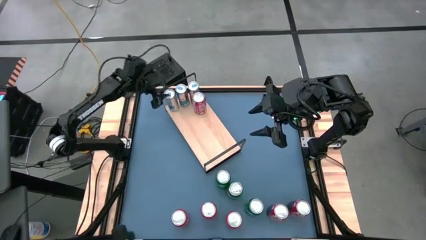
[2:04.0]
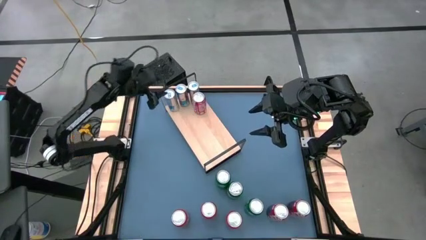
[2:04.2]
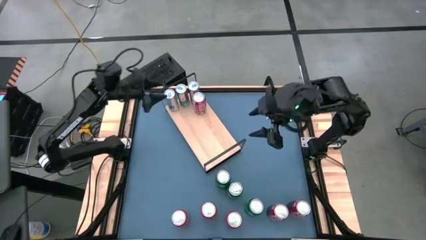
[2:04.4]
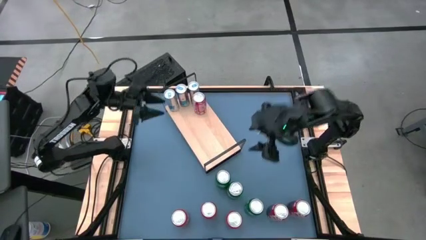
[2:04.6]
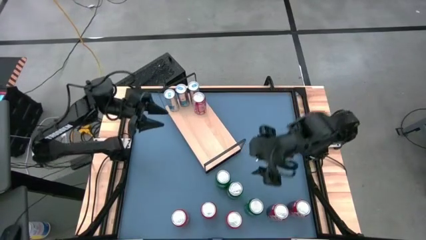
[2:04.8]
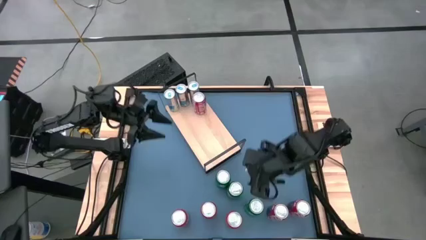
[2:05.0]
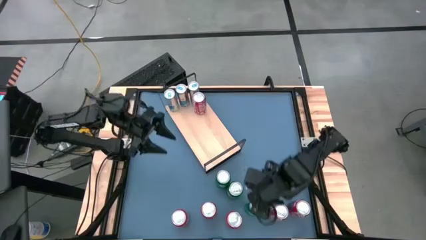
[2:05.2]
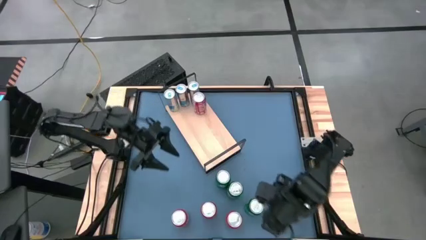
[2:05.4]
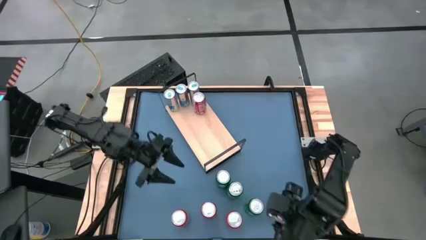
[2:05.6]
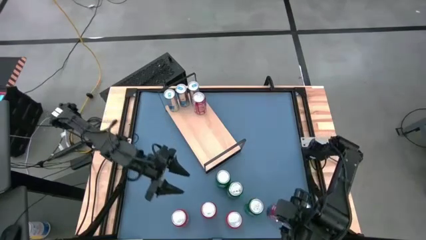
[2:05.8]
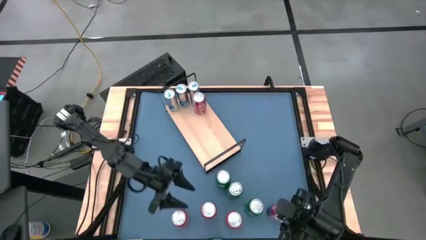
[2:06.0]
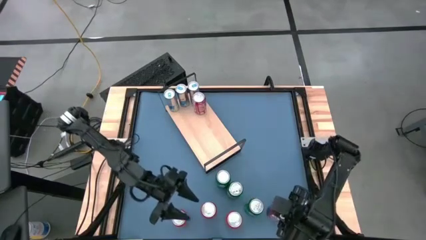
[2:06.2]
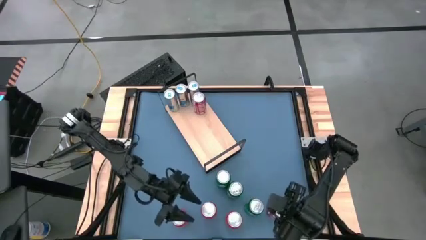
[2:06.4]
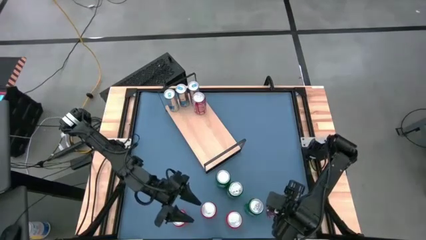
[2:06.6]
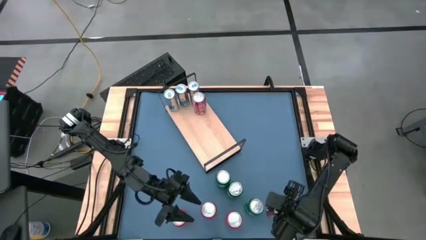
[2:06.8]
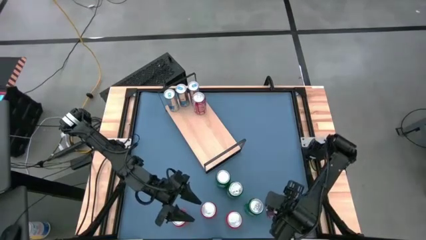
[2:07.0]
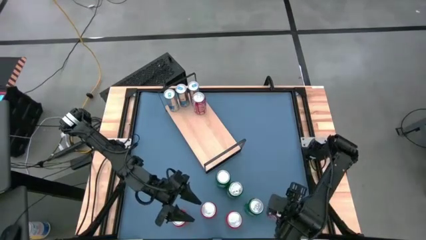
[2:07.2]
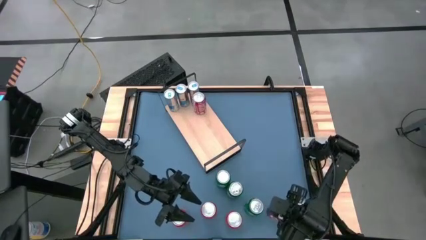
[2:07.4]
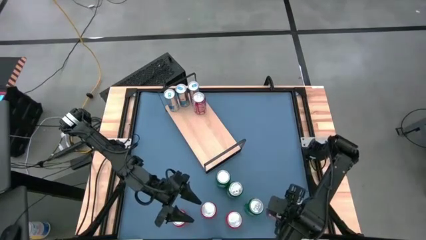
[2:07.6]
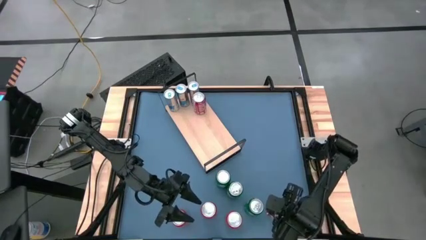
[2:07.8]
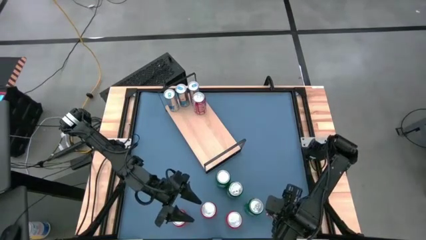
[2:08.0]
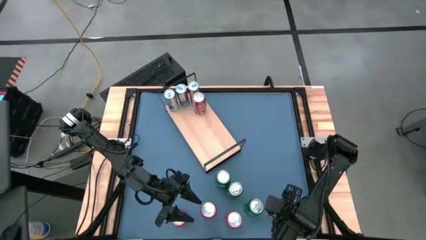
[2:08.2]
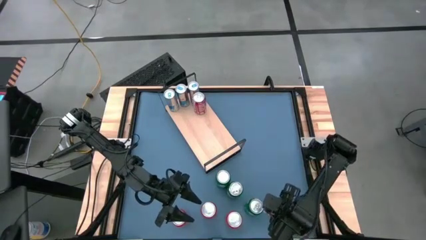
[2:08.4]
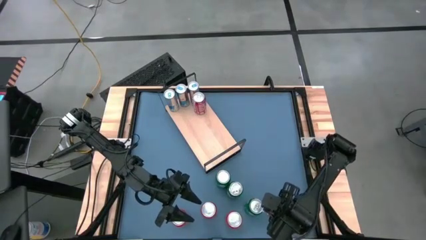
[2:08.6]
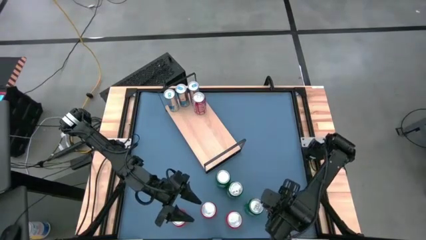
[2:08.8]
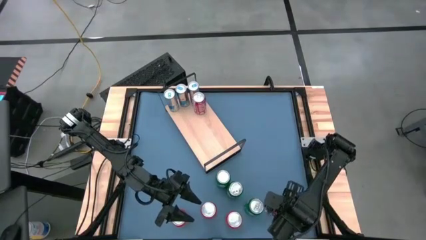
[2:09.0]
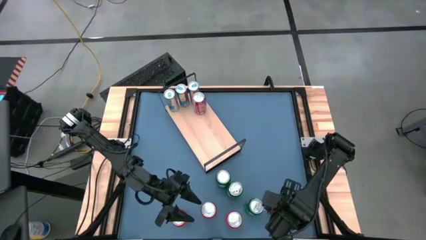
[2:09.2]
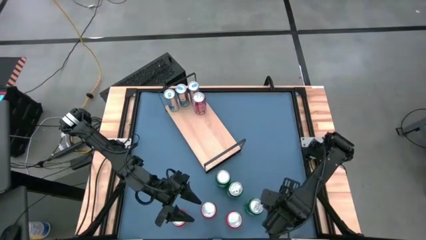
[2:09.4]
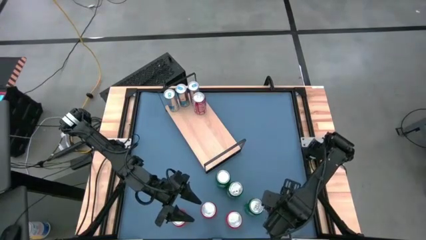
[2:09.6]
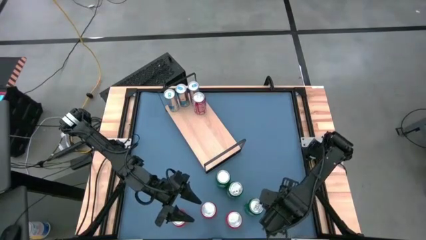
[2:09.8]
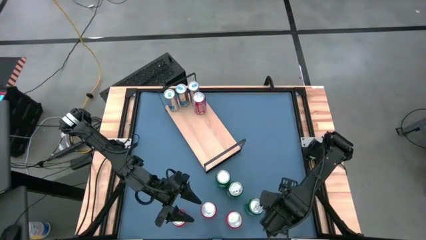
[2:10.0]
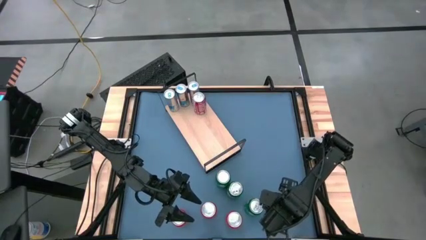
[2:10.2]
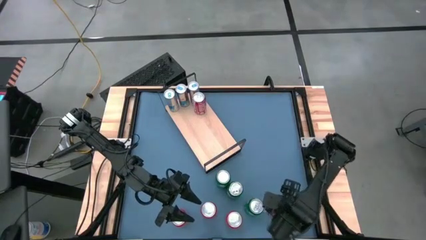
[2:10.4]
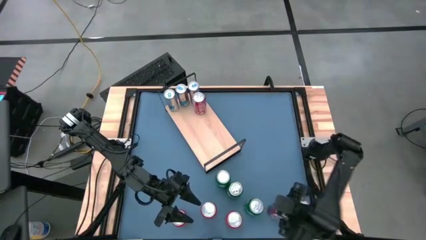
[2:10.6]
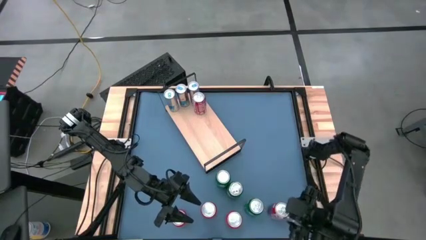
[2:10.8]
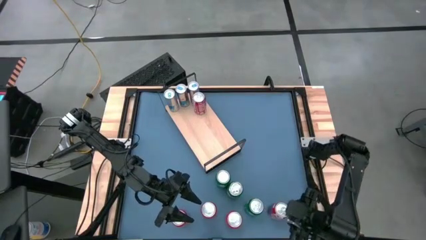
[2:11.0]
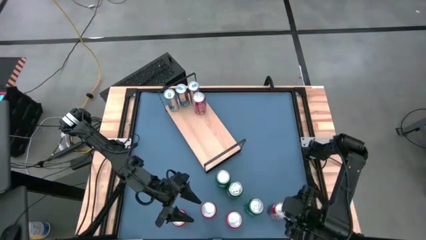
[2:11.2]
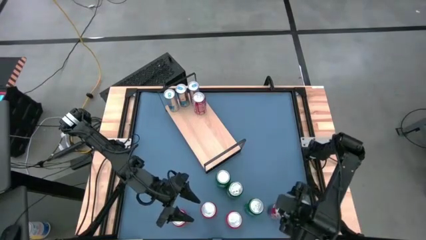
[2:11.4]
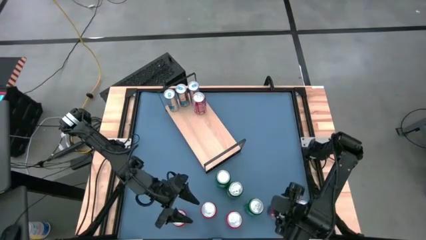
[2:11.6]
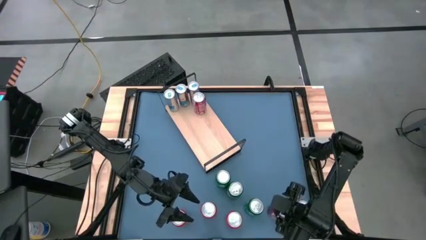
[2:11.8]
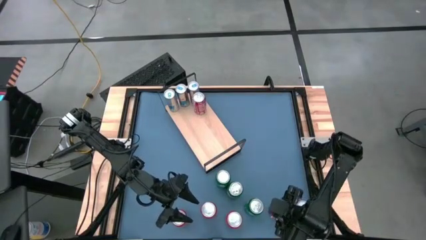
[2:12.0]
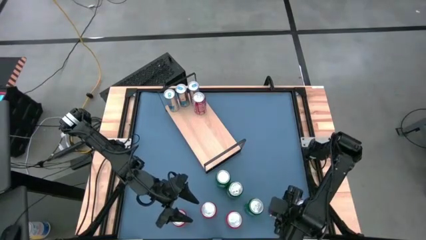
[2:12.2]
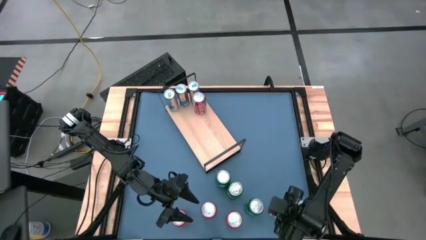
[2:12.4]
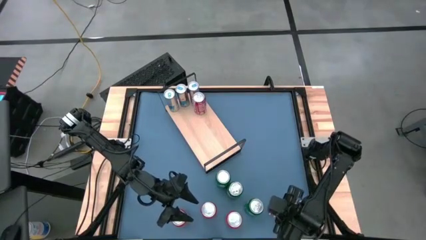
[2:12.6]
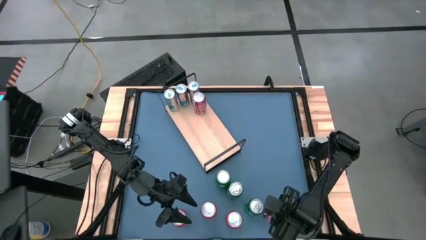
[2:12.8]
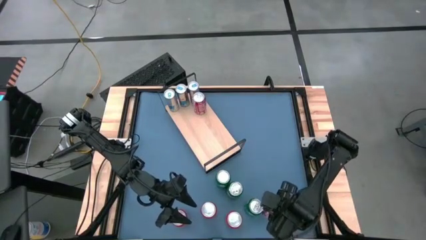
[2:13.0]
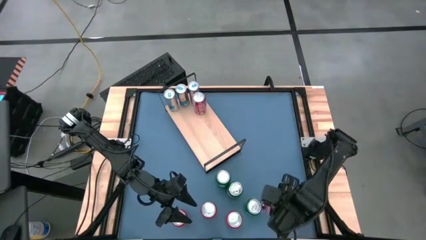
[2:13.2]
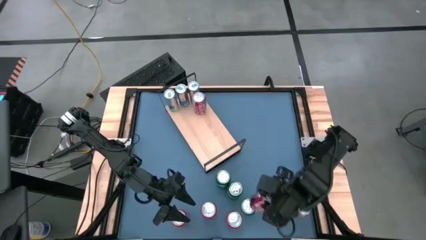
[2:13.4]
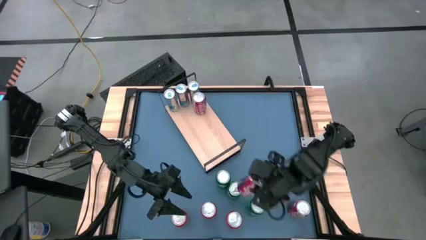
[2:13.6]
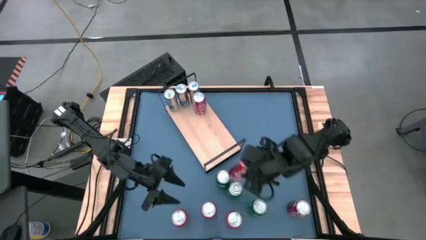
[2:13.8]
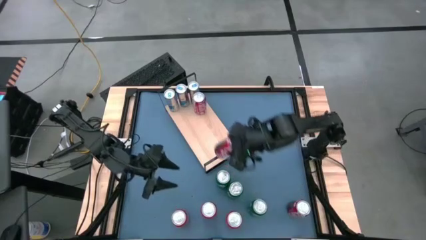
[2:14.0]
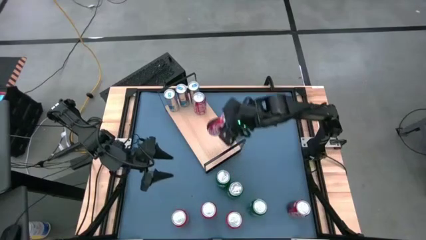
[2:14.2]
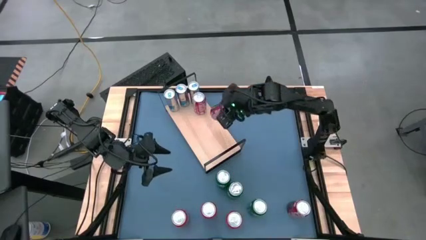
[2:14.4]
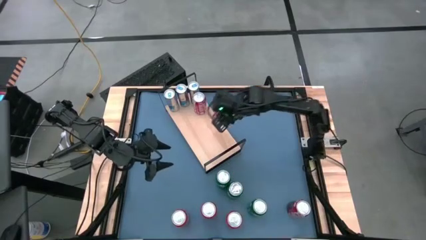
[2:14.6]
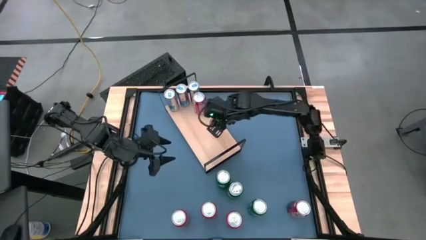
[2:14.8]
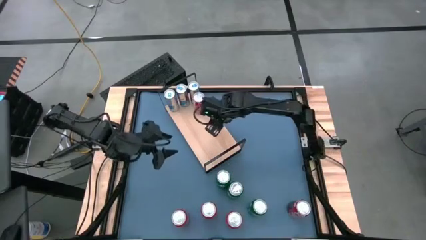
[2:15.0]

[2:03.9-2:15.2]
Task: Place canned beverage on shelf
Put the left red white soda can on the shelf aligned with the other red white soda can
